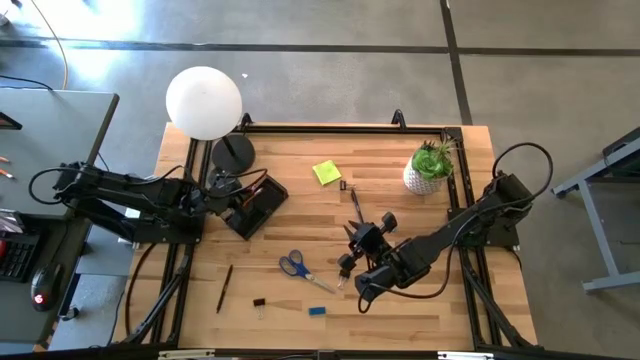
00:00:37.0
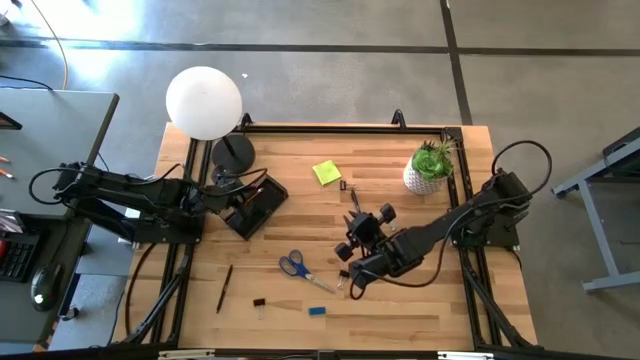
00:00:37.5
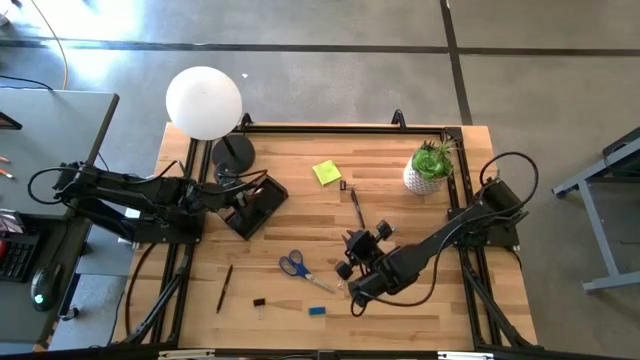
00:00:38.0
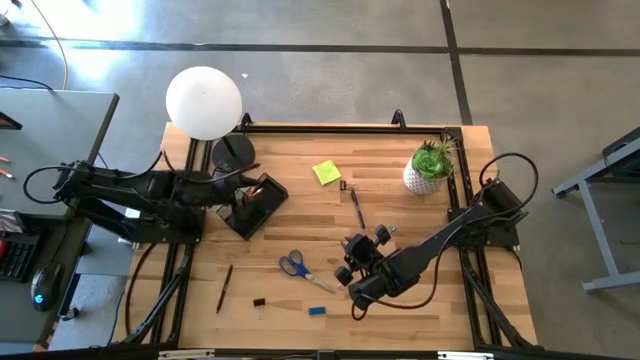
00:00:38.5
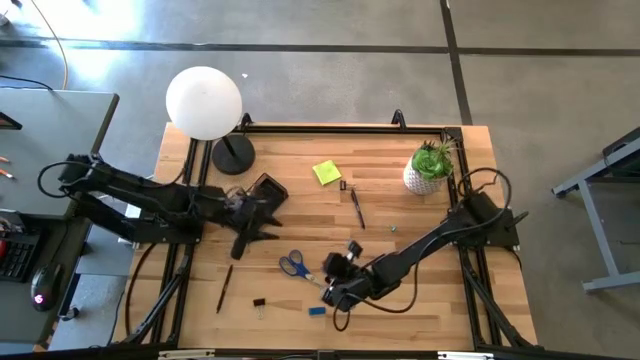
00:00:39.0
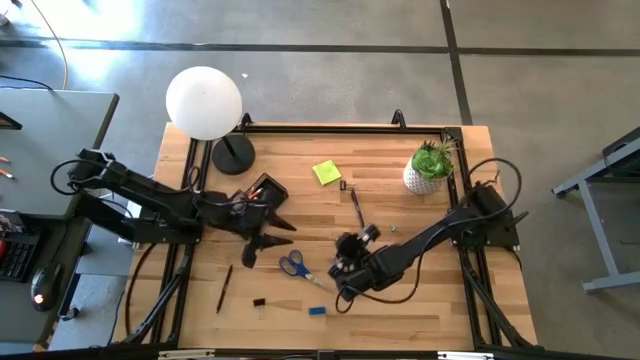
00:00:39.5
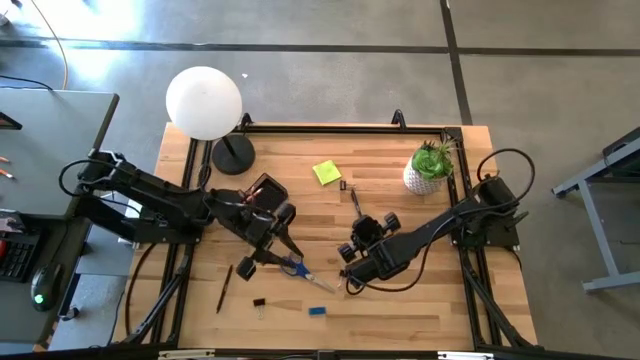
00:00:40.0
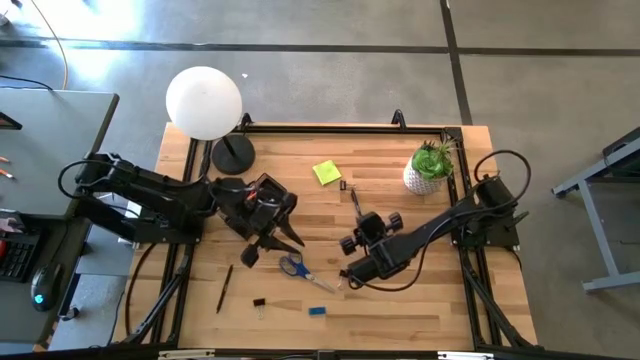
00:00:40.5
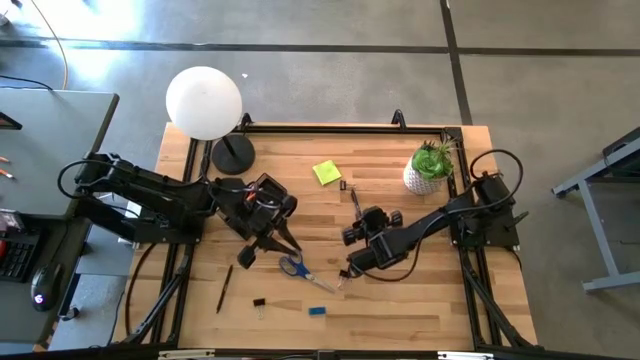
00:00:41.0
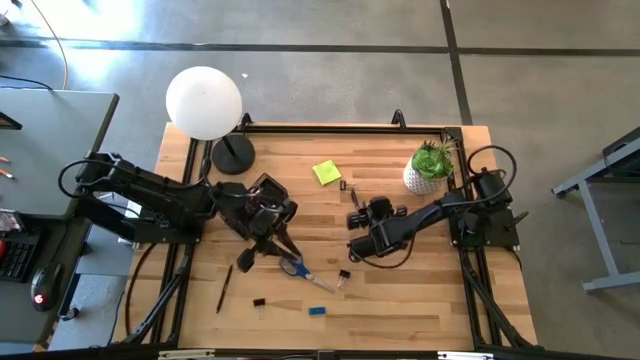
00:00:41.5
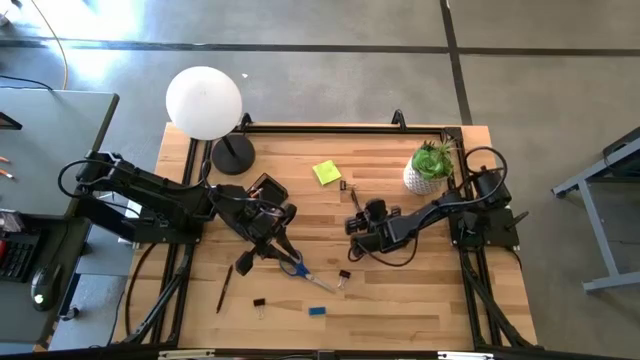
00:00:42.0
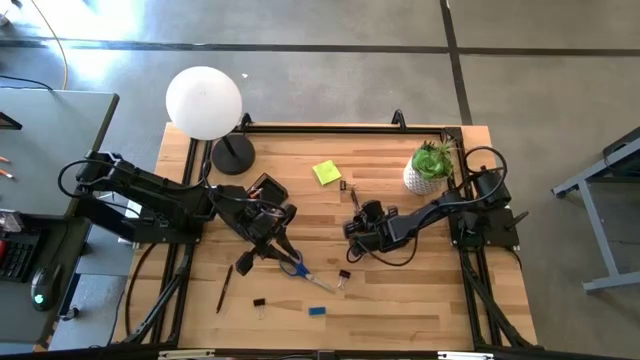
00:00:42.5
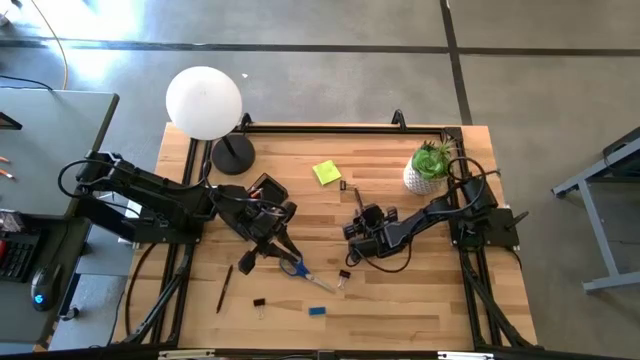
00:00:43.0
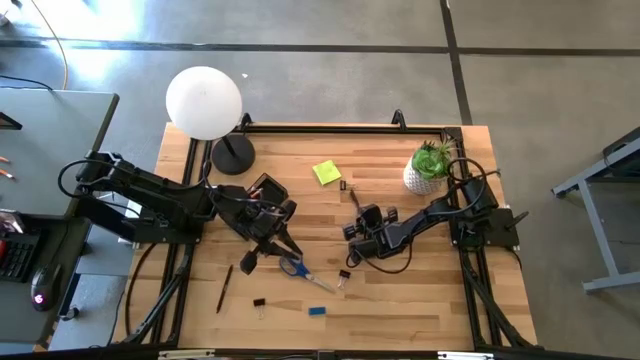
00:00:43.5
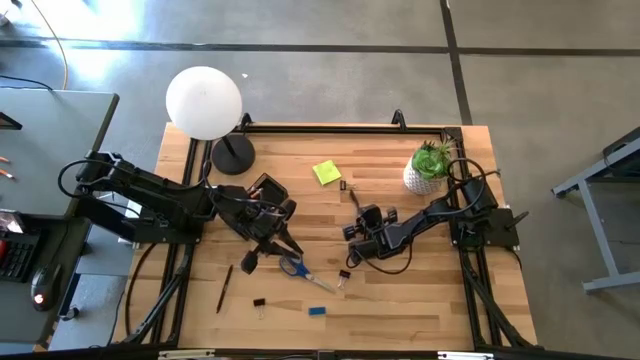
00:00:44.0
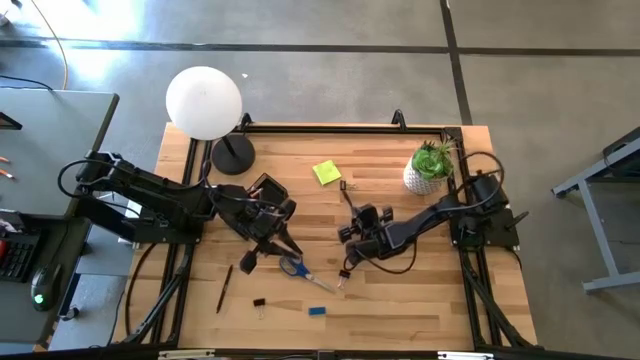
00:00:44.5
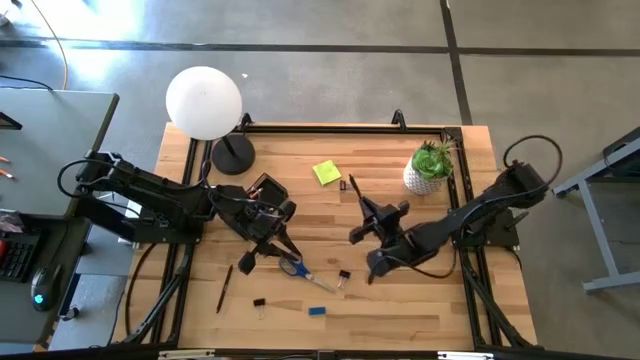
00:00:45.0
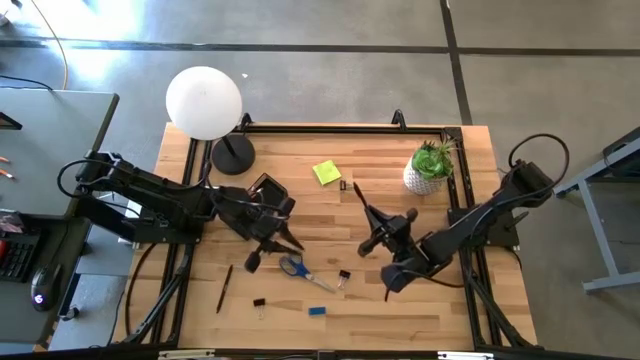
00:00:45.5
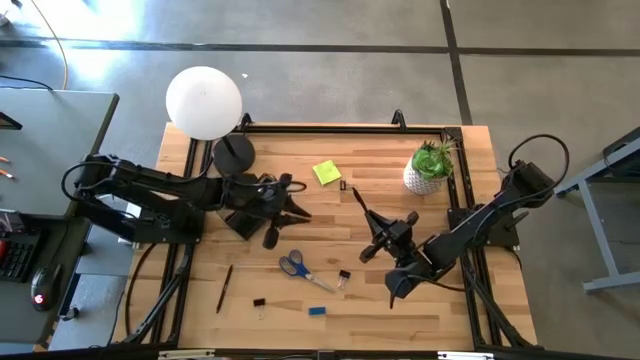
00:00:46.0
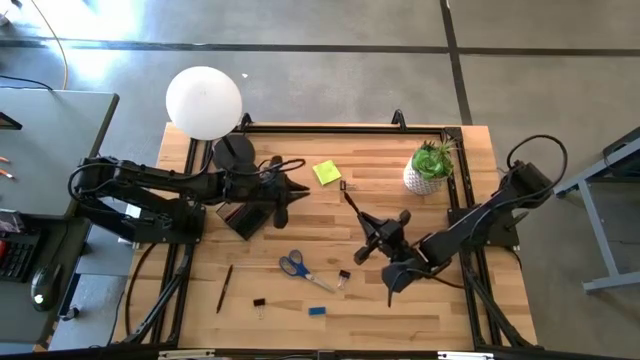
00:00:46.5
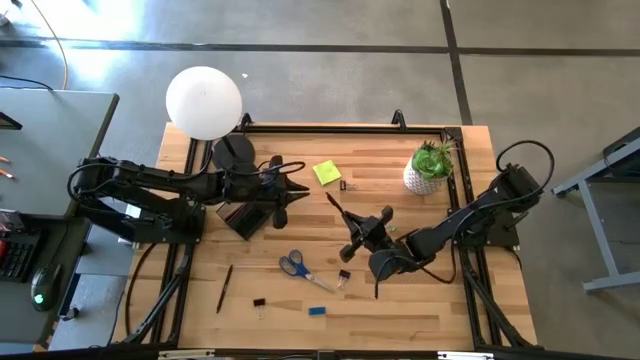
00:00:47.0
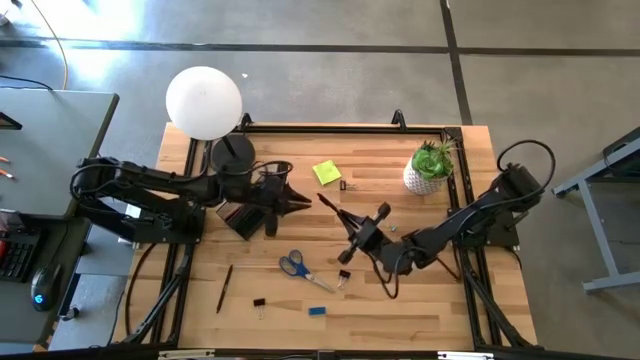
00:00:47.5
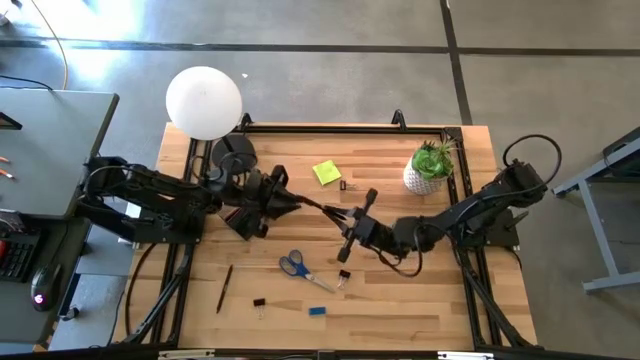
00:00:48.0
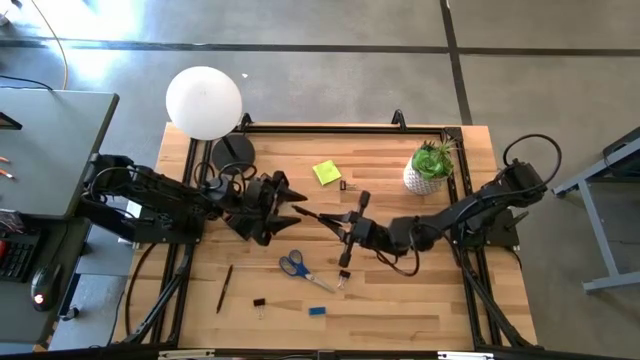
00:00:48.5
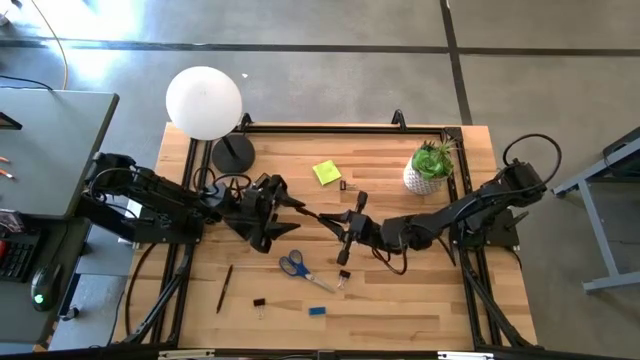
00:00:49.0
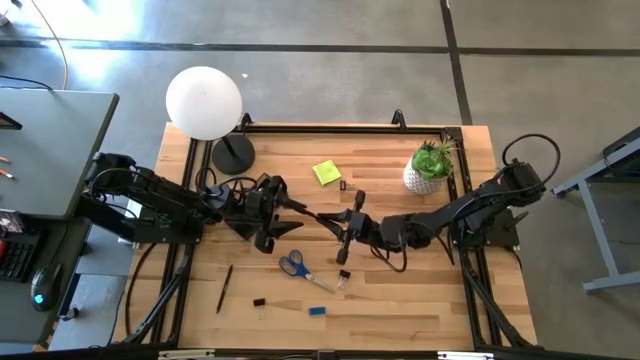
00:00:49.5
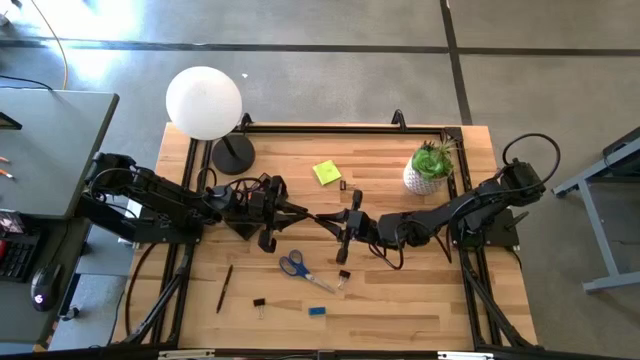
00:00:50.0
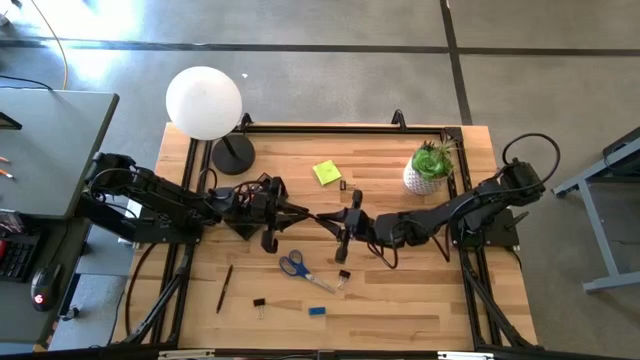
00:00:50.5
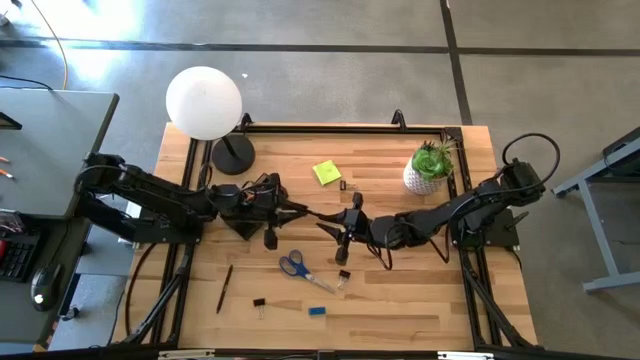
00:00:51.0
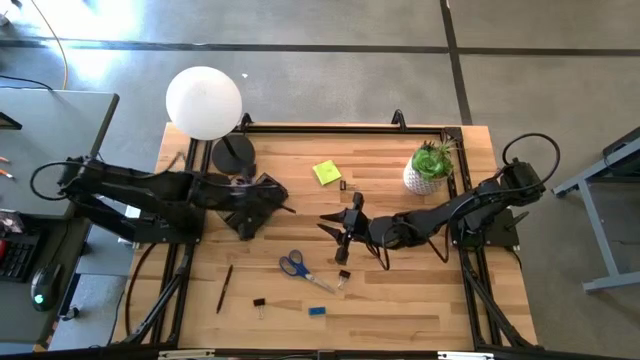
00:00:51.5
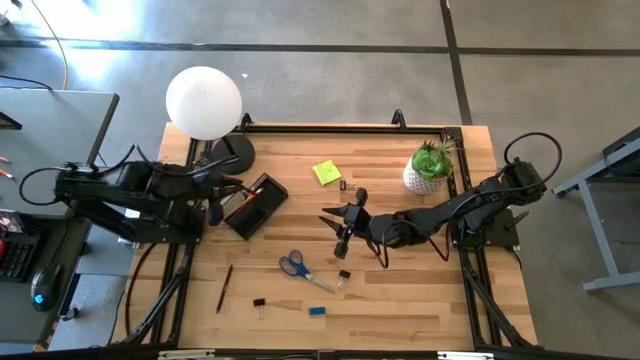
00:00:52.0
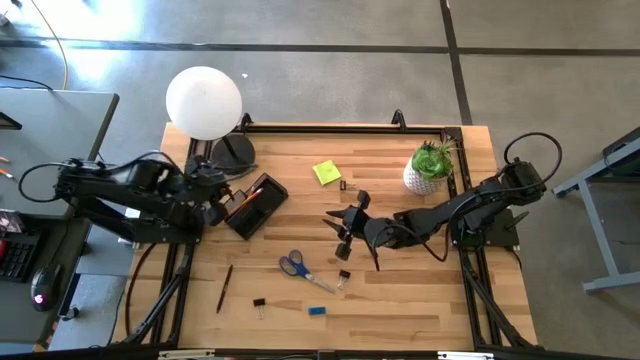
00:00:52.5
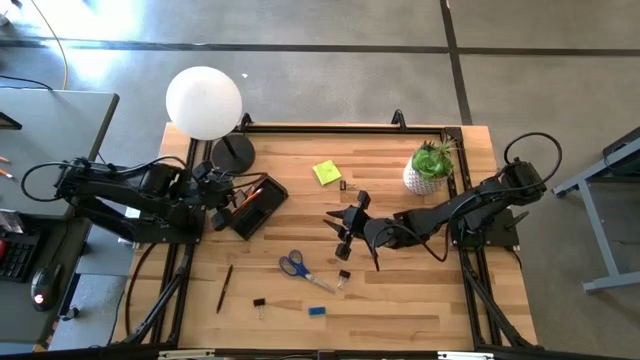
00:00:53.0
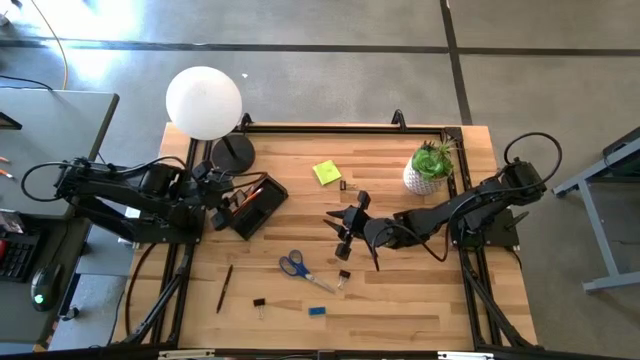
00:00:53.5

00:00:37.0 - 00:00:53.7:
Task: Pick and place office supplies into organizer
Put the right black pen into the metal mesh desk organizer

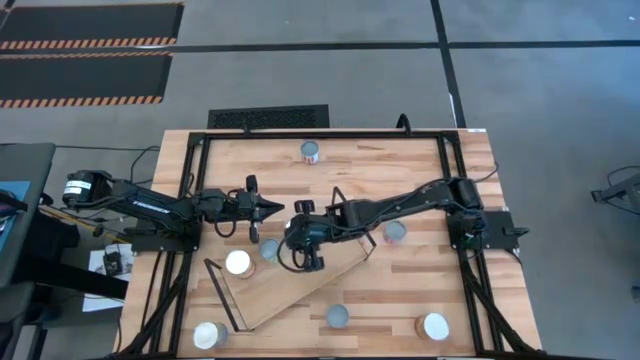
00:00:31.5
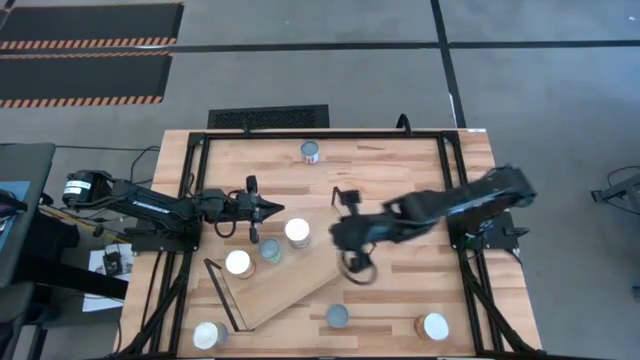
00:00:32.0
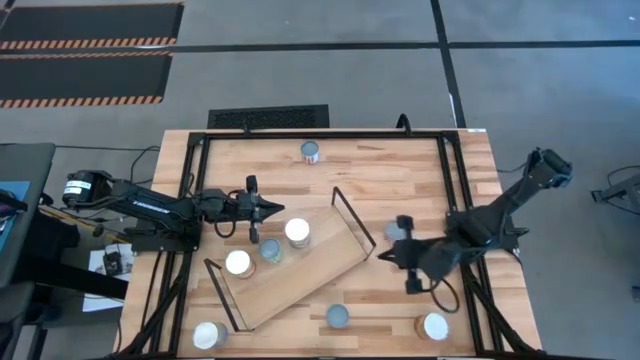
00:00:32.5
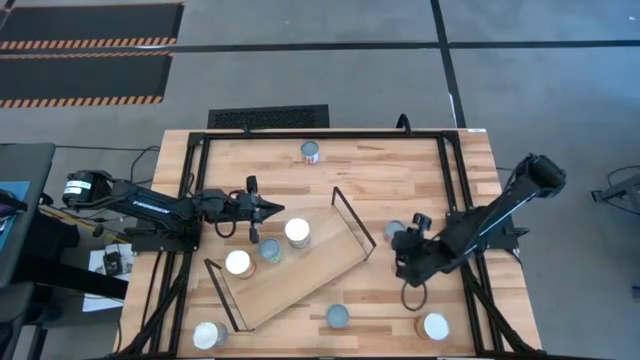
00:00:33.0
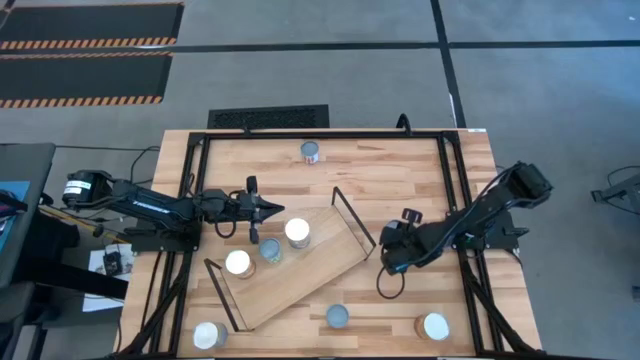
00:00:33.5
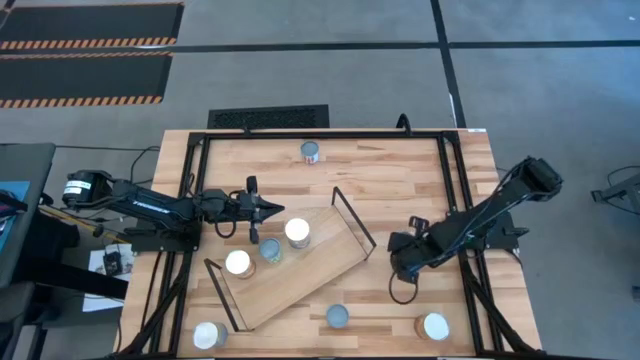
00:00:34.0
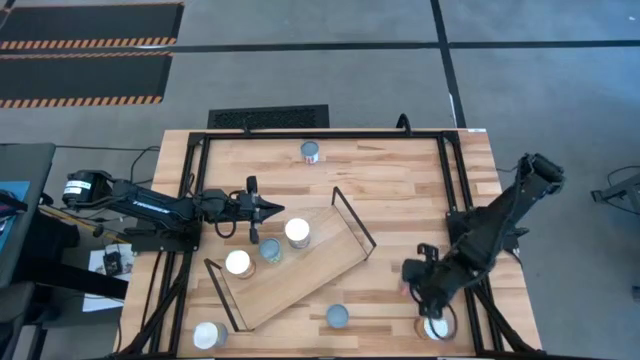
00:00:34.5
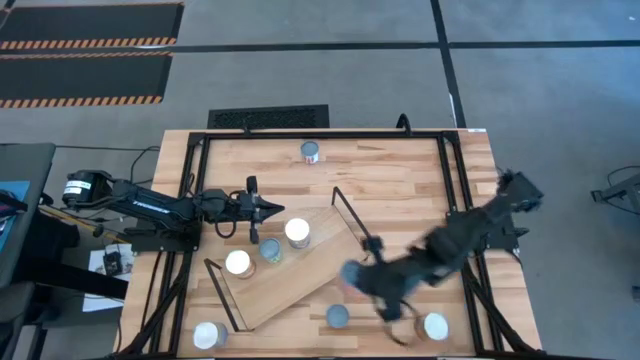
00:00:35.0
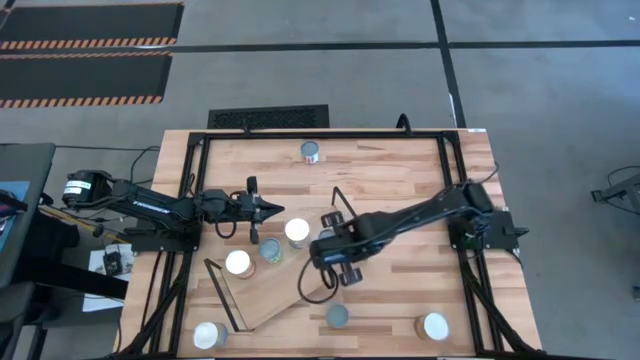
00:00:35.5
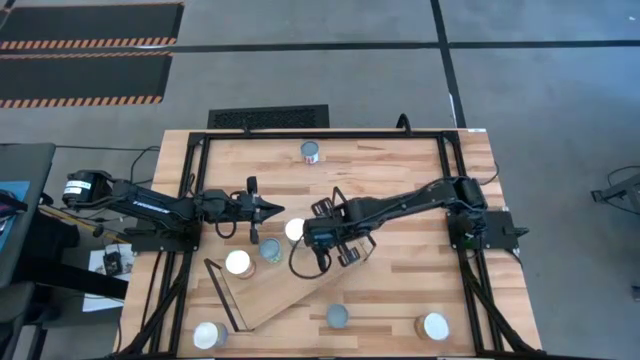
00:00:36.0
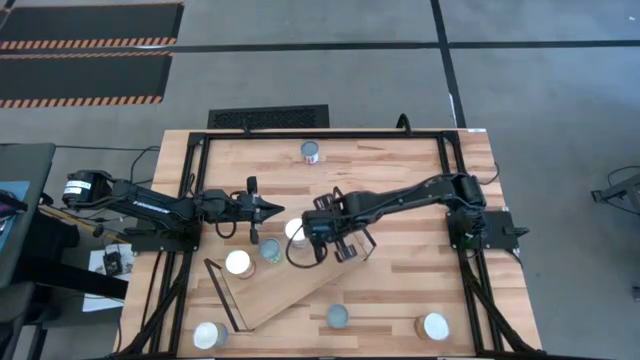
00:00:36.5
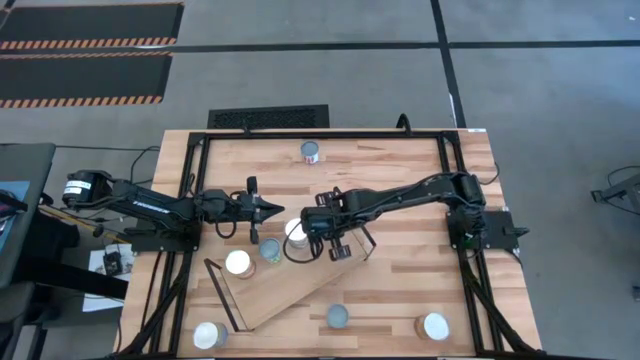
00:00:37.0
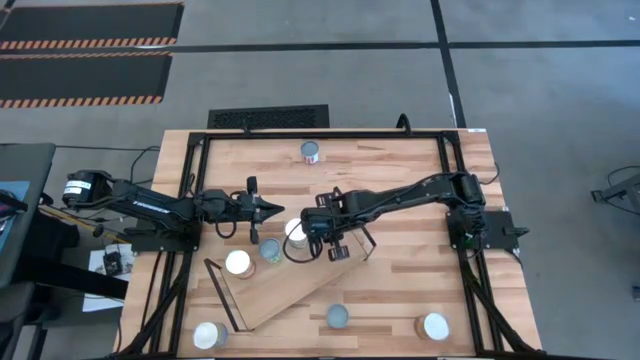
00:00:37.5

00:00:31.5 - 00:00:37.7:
Task: Pick and place cans onto a shelf
Put the canned corn on the shelf
